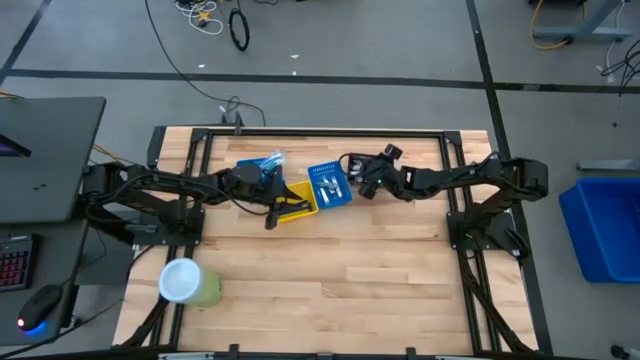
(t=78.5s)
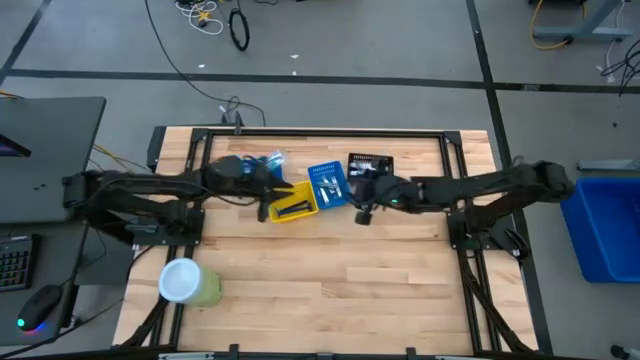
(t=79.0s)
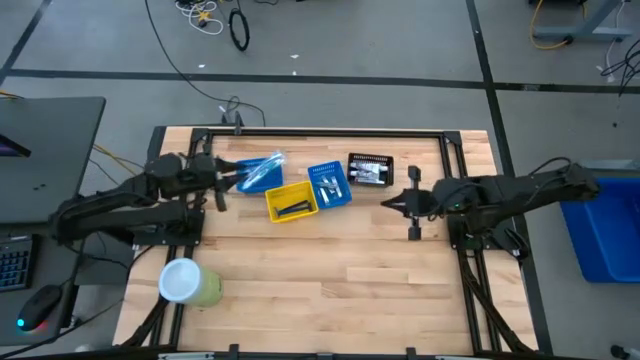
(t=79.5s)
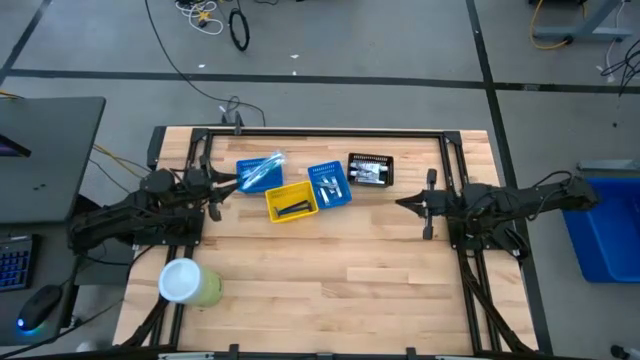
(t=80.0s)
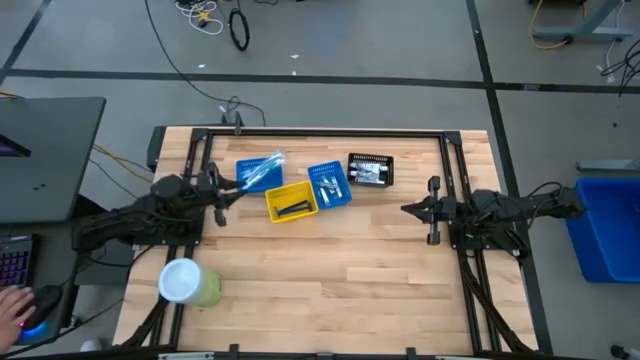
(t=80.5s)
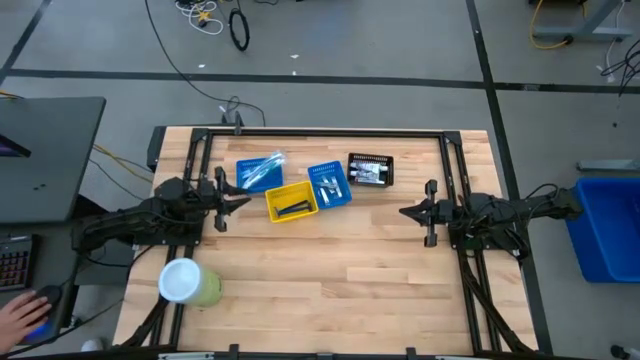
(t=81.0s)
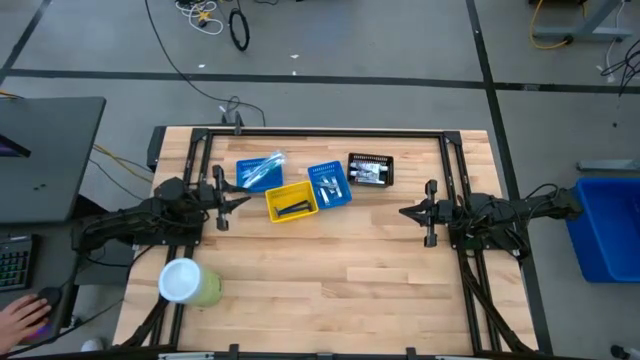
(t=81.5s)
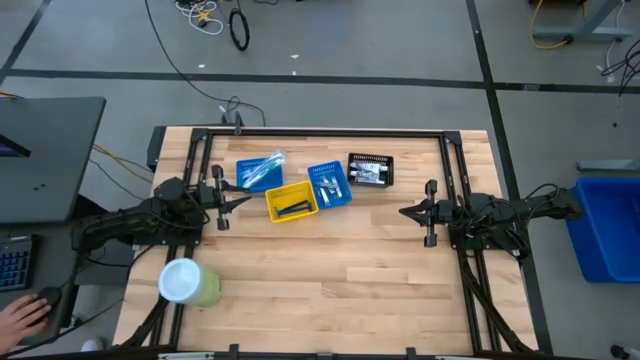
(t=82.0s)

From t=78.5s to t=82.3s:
Task: Pick & Place Travel size toiletries
Return to Home Position

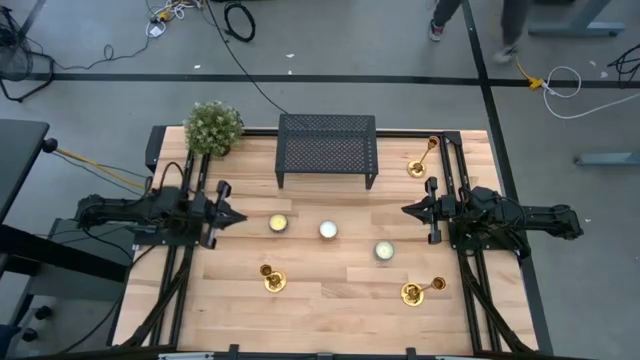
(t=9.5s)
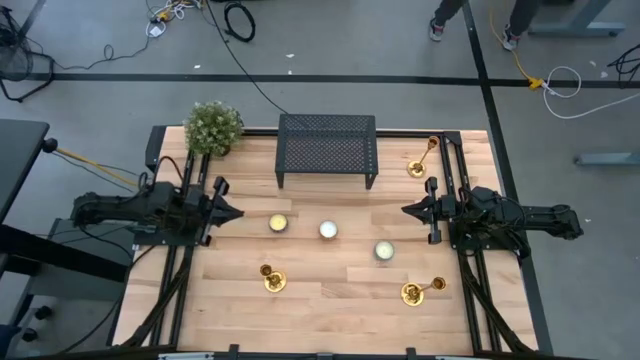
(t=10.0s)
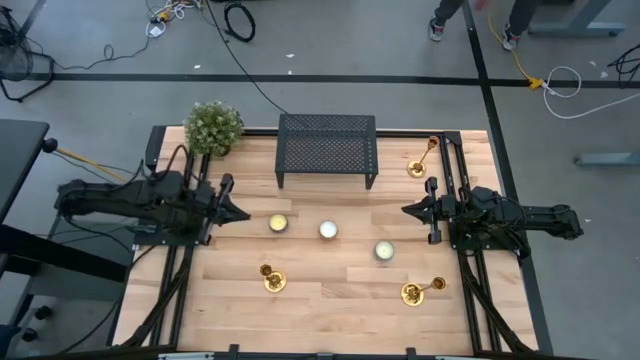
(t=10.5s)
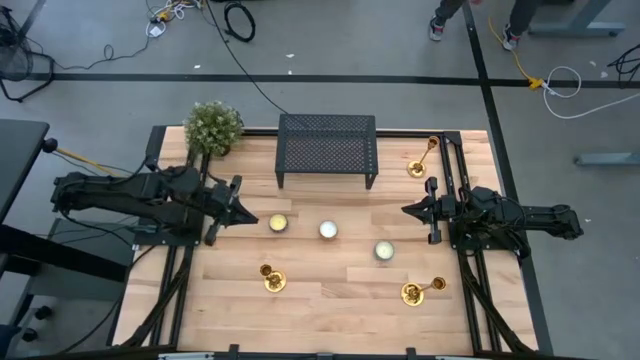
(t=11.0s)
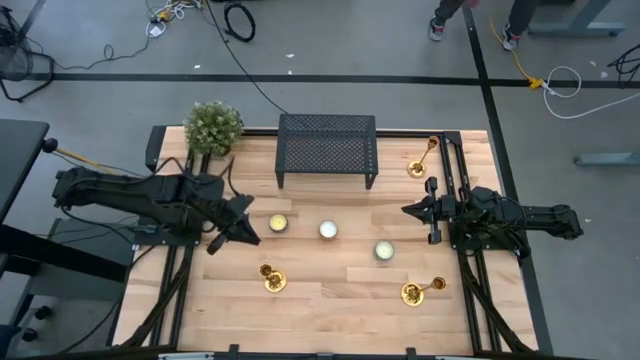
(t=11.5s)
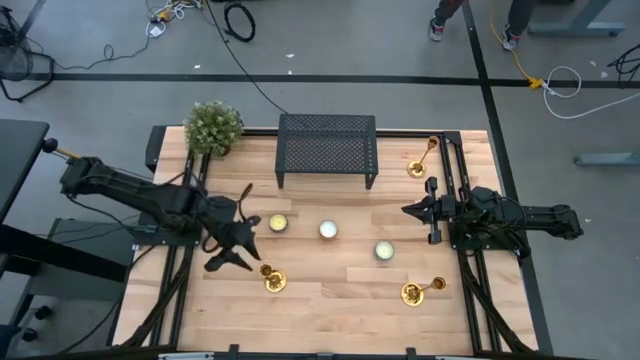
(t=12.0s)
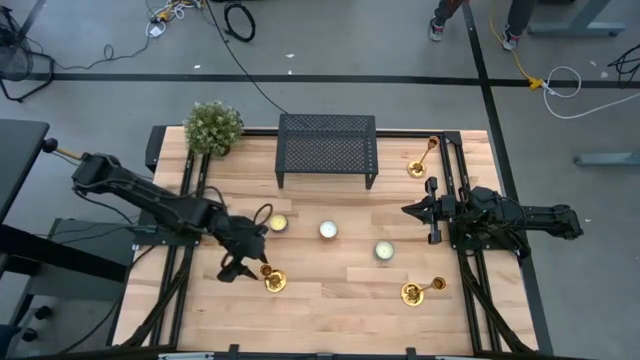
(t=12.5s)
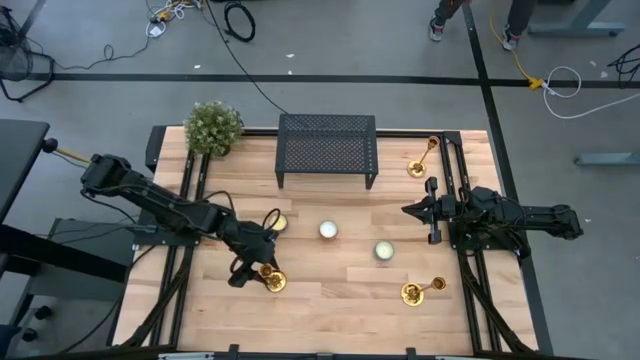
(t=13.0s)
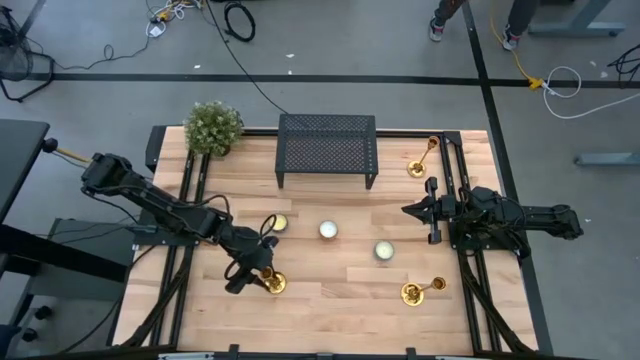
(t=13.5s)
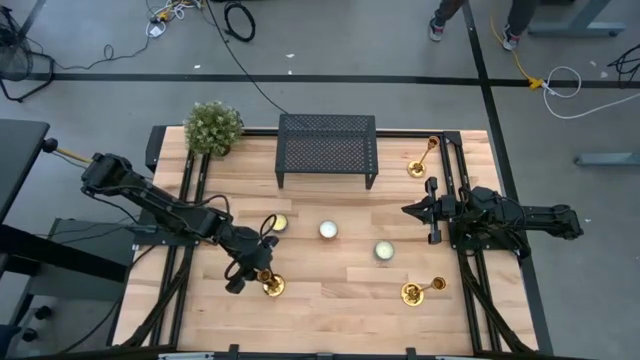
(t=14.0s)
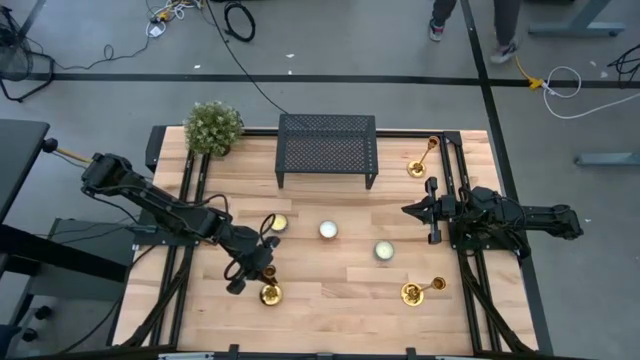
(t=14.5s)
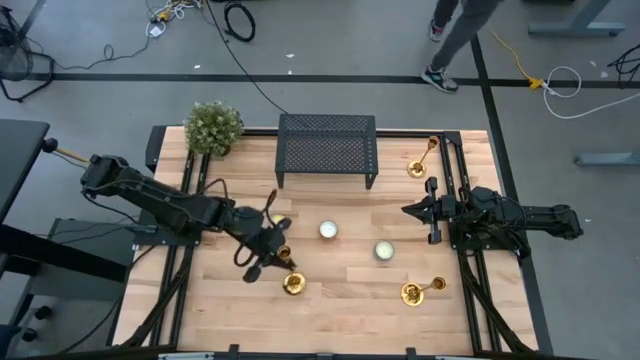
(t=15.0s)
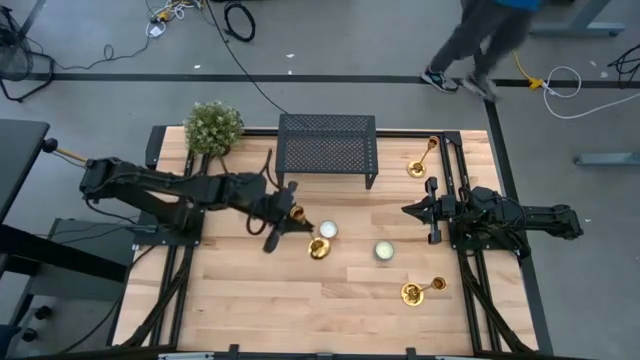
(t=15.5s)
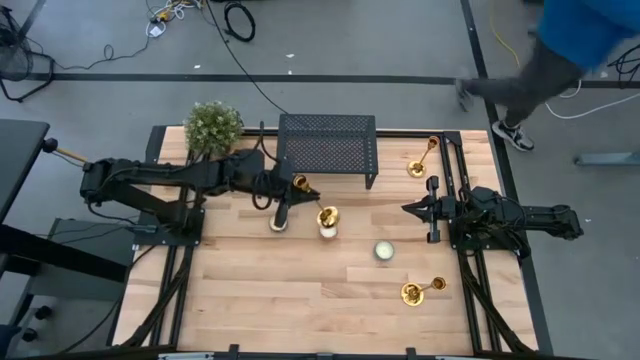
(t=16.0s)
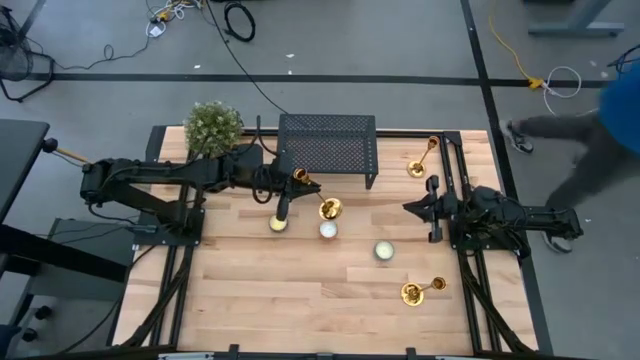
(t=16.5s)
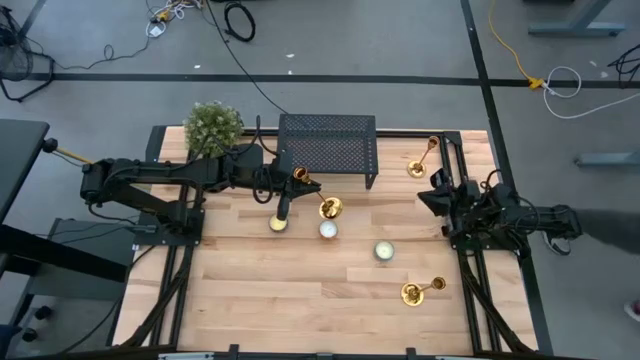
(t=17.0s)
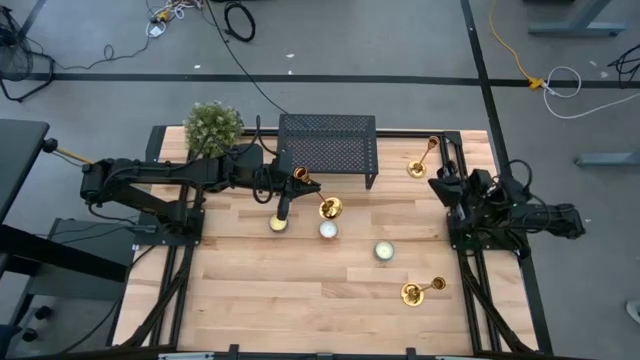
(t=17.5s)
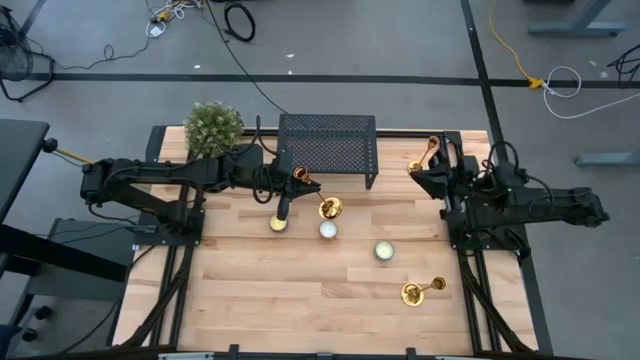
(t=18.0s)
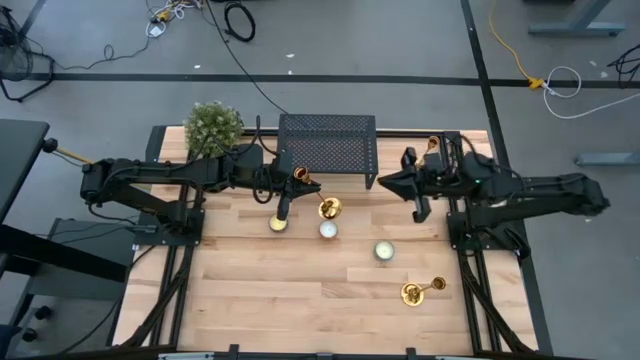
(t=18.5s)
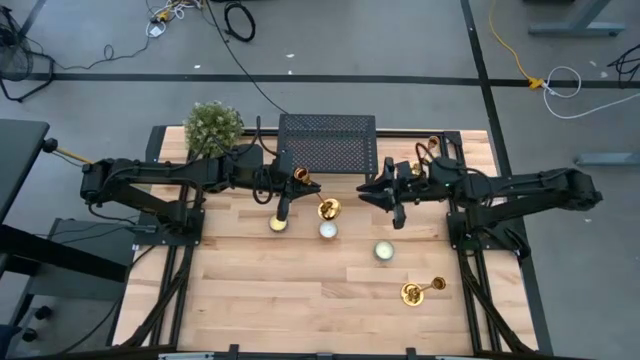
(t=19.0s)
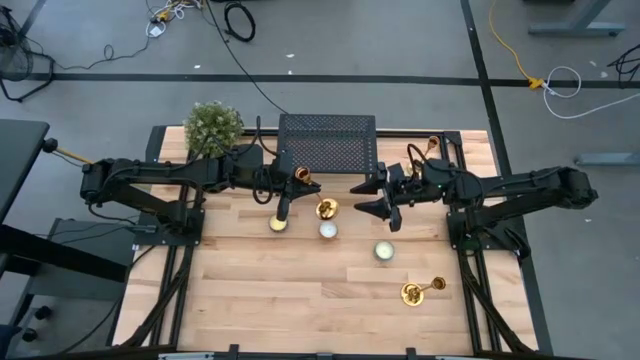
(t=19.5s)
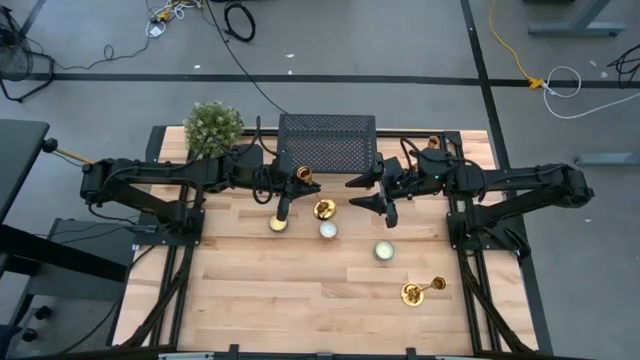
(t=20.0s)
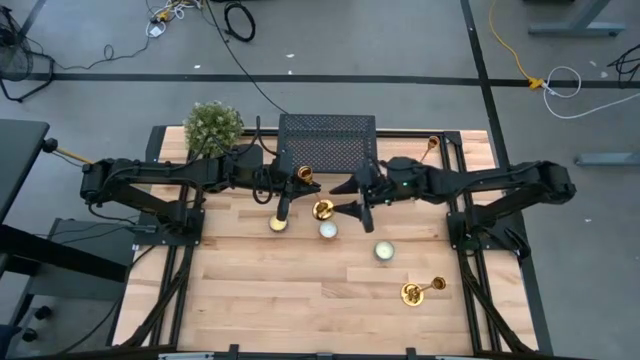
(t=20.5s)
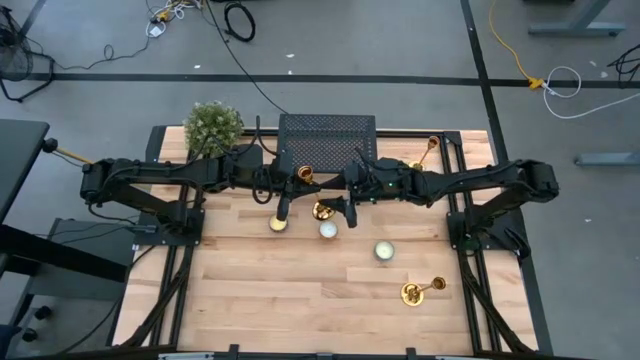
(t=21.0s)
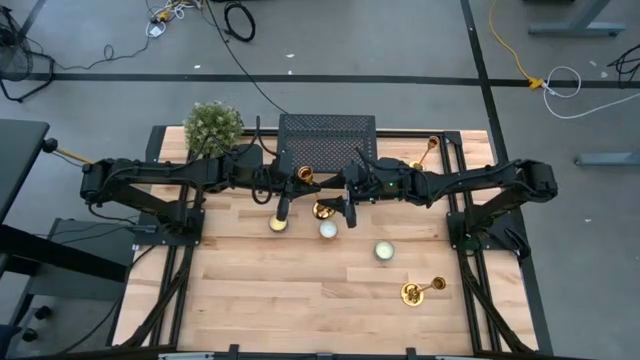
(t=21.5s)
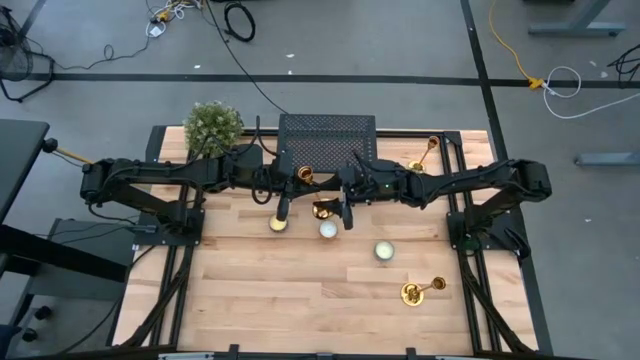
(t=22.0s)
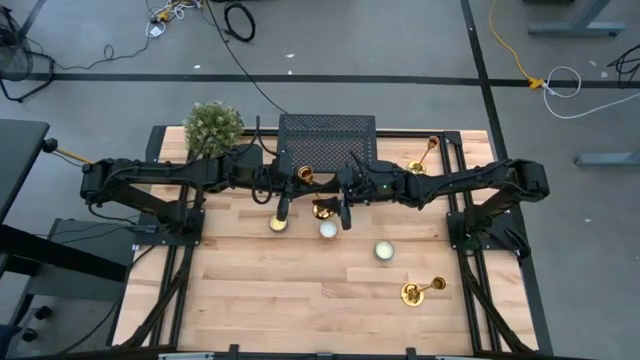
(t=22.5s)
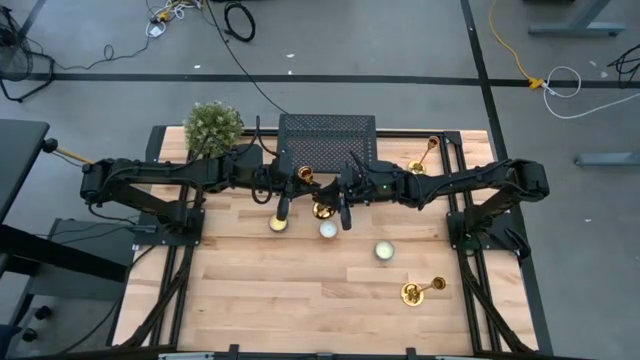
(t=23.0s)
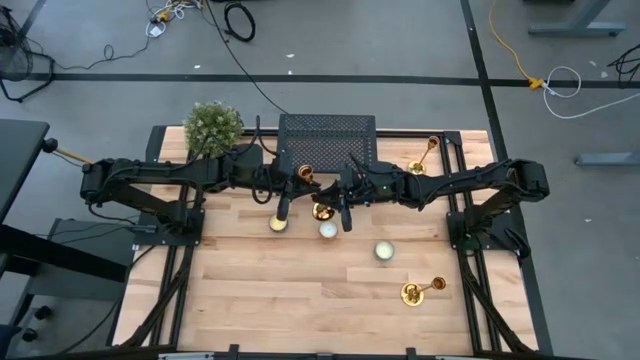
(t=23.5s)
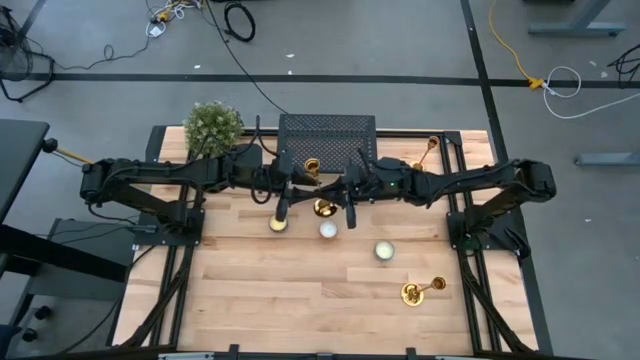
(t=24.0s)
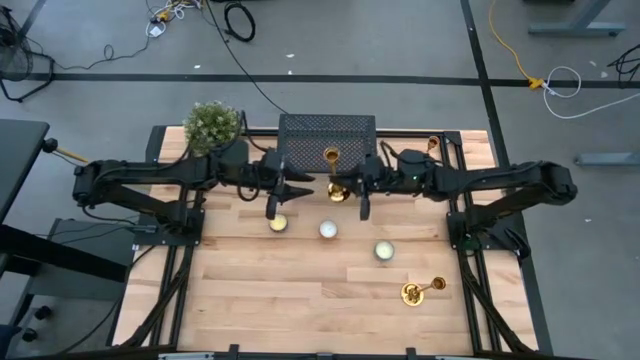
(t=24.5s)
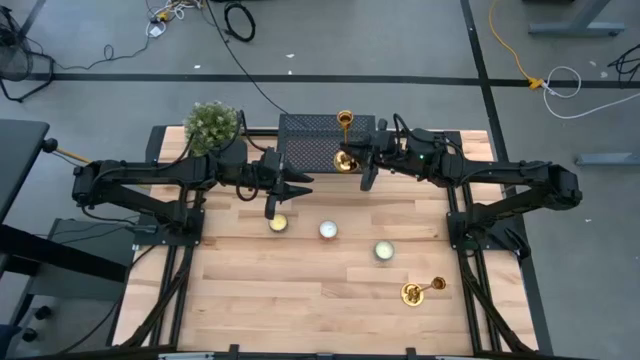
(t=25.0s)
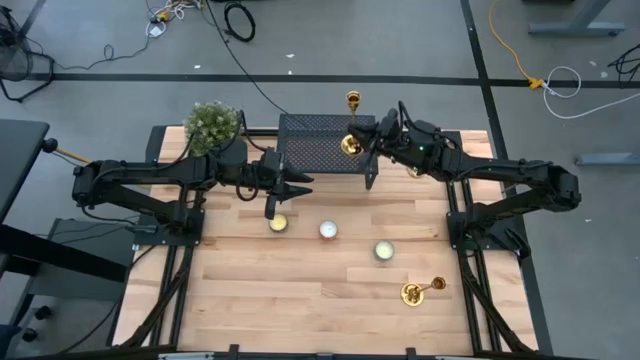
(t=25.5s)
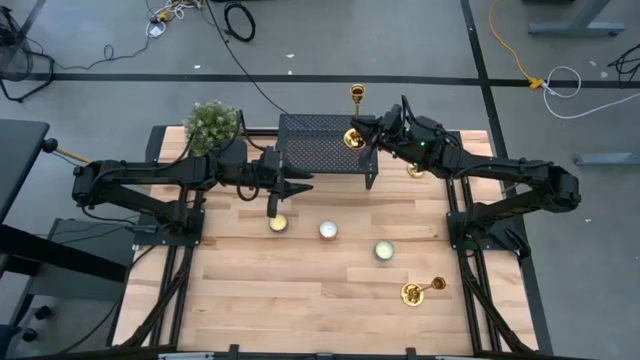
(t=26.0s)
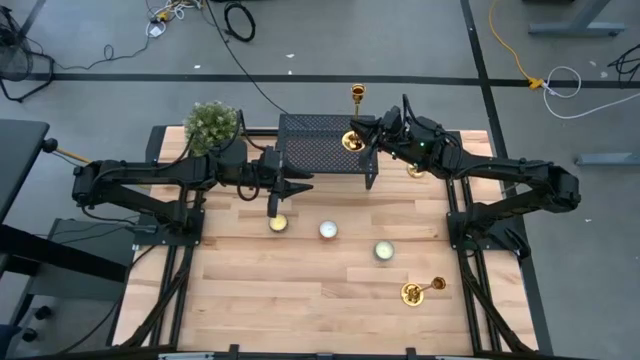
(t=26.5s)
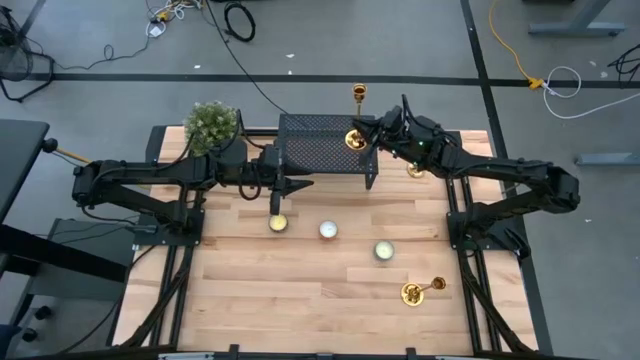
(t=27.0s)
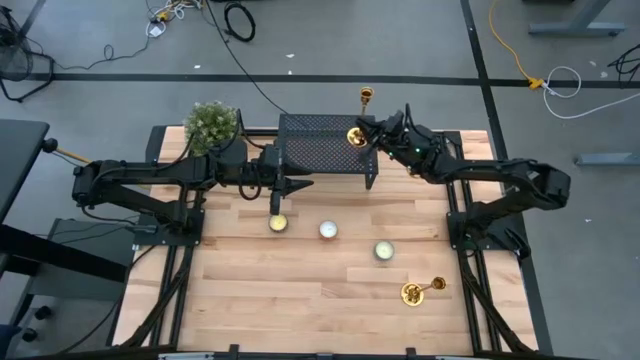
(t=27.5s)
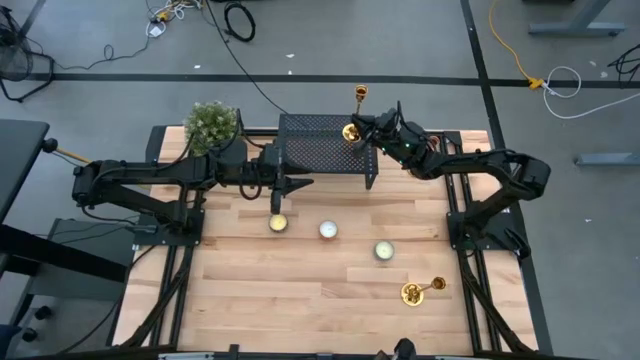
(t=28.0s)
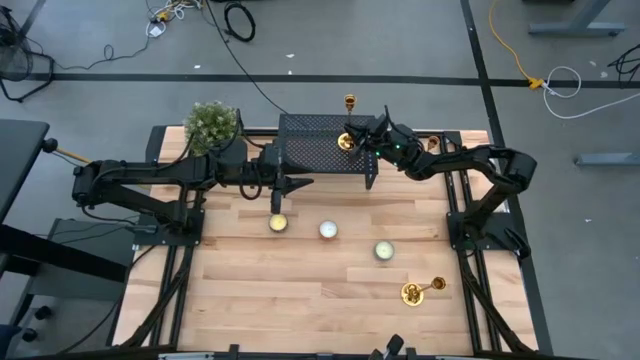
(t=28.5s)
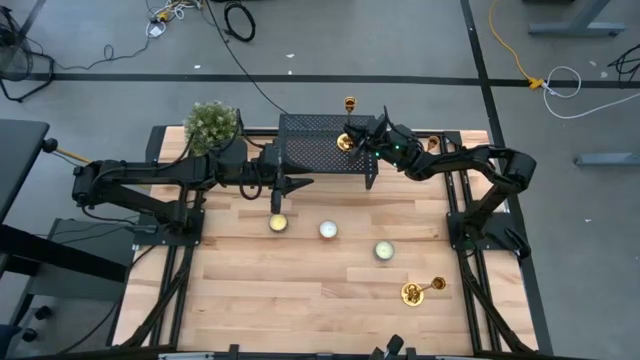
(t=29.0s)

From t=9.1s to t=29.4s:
Task: Pick & Place candle stick holders
Put the bottom left gold candle holder on the shelf
